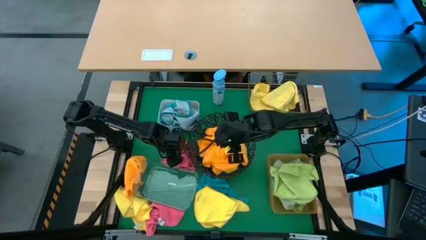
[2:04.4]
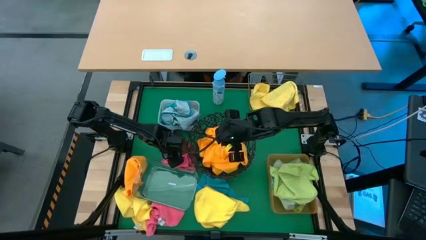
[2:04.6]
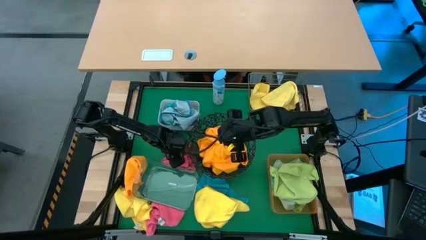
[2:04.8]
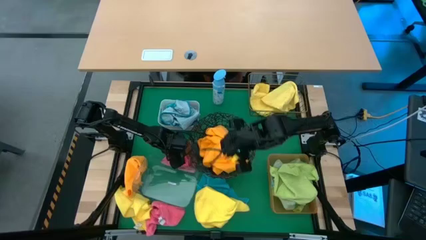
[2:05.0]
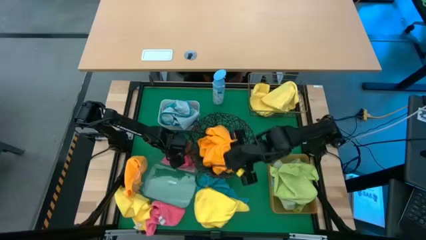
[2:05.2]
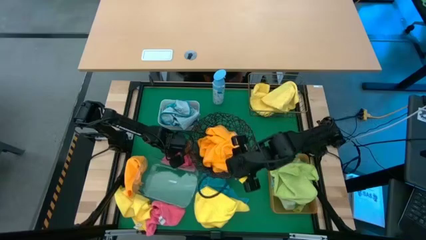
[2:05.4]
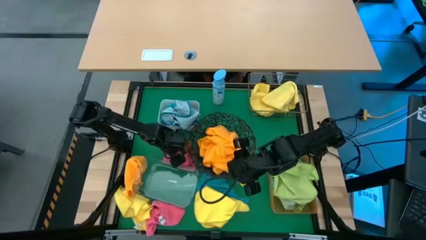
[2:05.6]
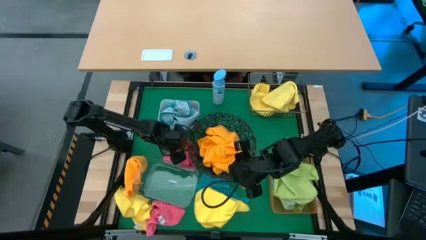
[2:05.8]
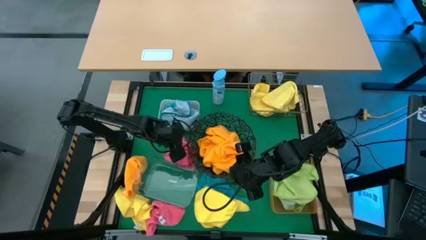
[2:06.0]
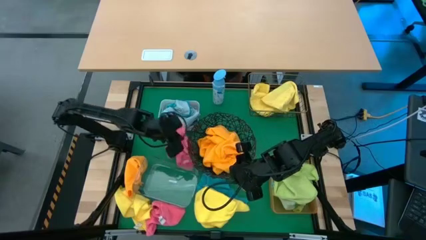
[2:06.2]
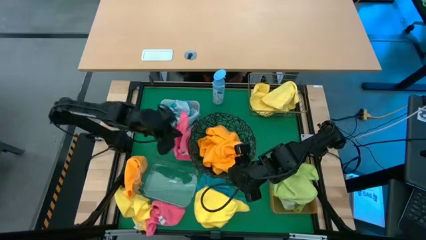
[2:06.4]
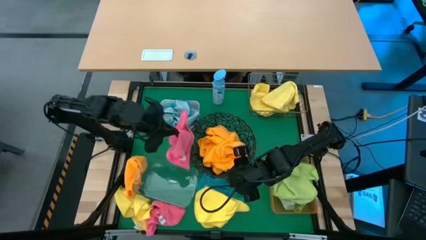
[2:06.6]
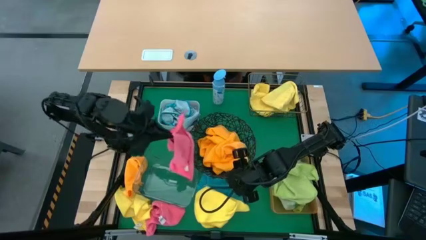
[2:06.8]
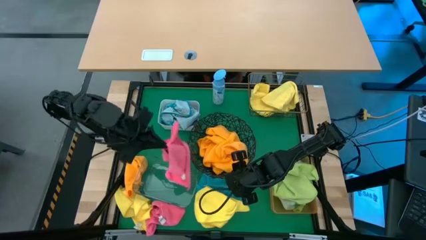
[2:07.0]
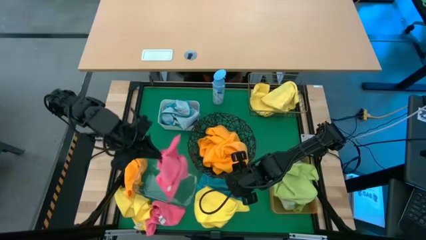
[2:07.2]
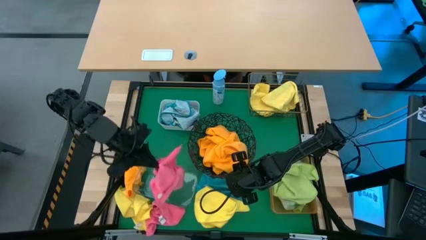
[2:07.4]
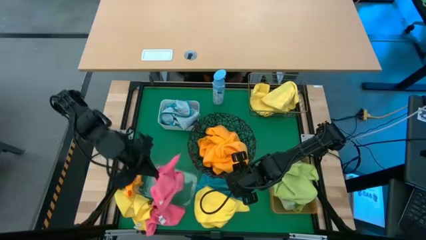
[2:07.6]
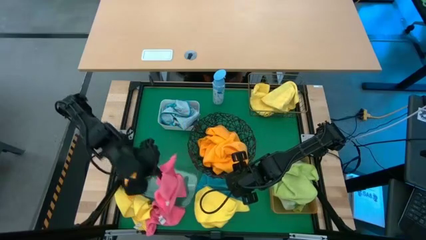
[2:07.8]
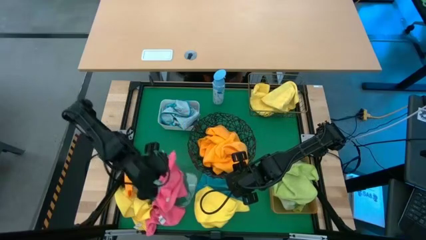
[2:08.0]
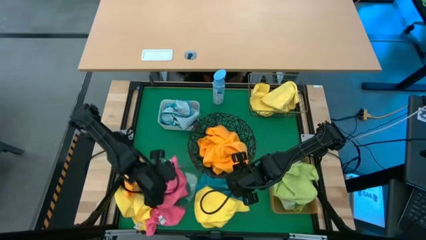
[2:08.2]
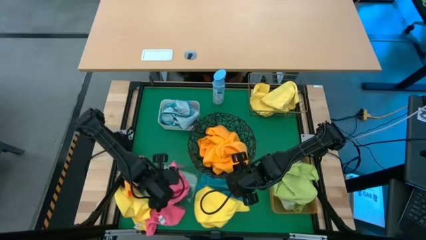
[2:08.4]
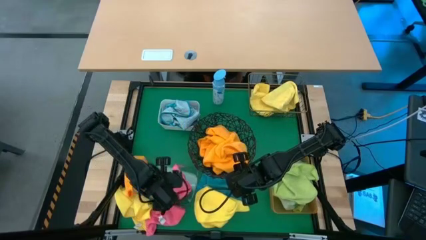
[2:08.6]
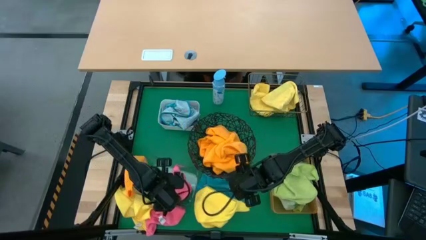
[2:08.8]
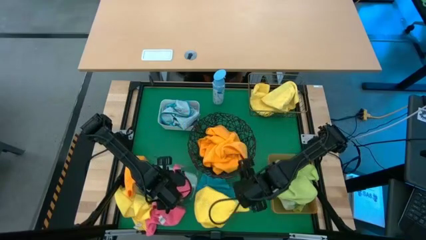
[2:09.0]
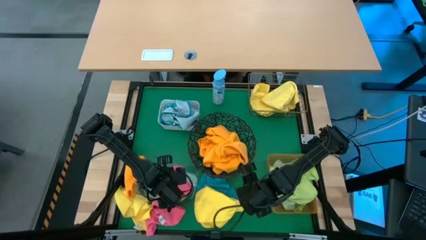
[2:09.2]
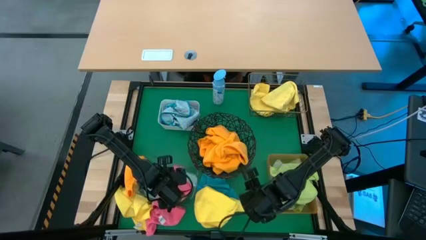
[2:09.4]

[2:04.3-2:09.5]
Task: Sort microfiber towel by color & place in baskets
Put the pink microfiber towel into the transparent bin

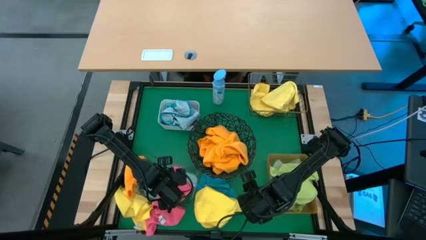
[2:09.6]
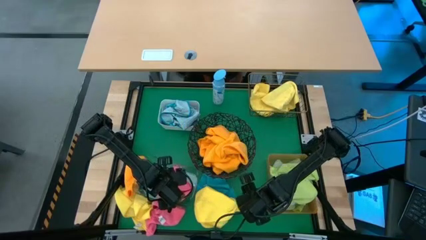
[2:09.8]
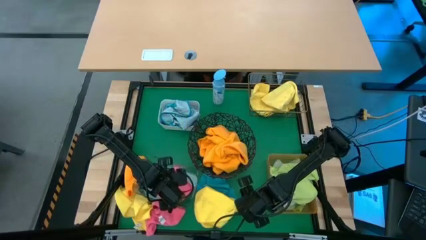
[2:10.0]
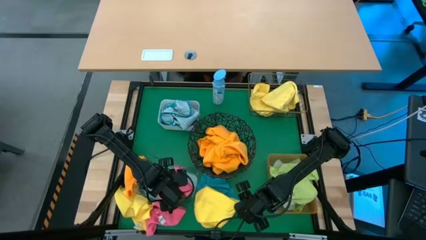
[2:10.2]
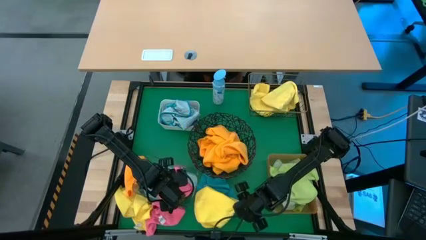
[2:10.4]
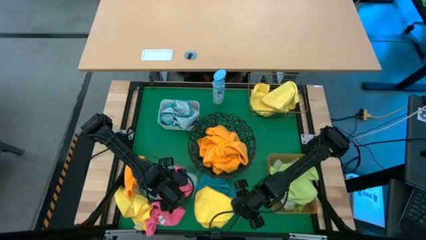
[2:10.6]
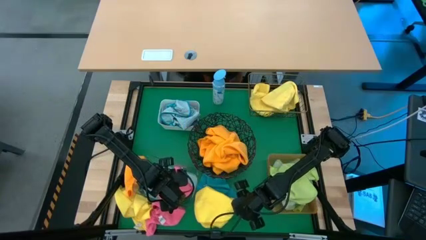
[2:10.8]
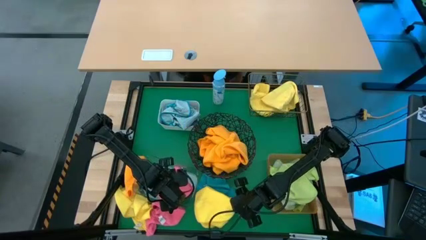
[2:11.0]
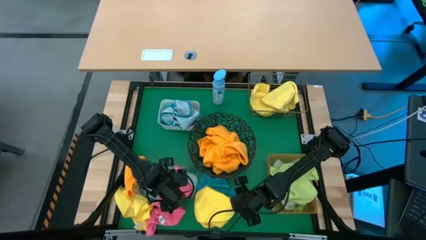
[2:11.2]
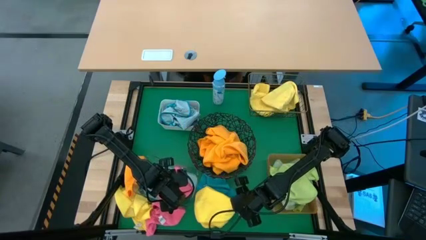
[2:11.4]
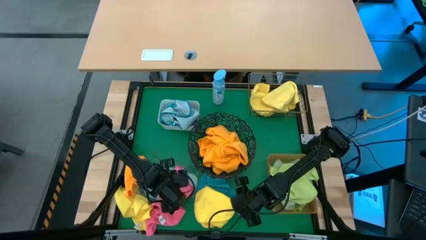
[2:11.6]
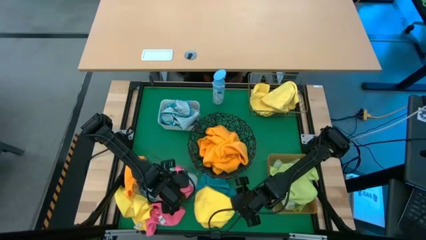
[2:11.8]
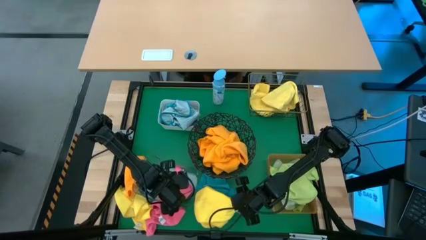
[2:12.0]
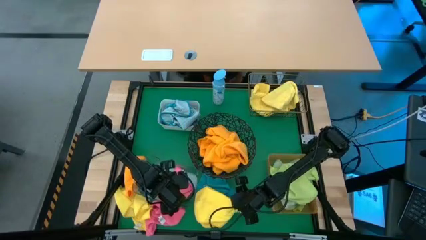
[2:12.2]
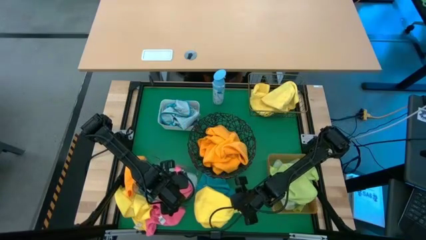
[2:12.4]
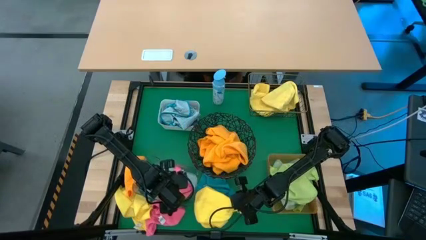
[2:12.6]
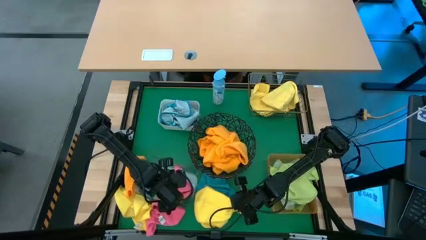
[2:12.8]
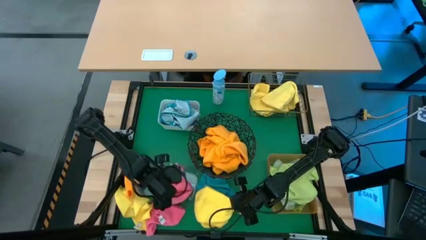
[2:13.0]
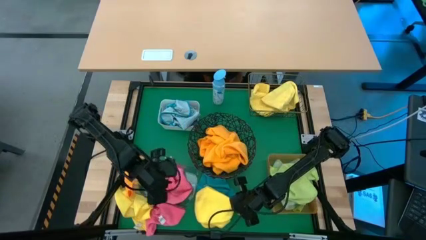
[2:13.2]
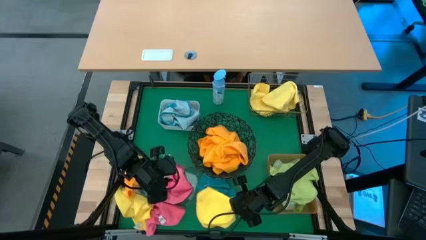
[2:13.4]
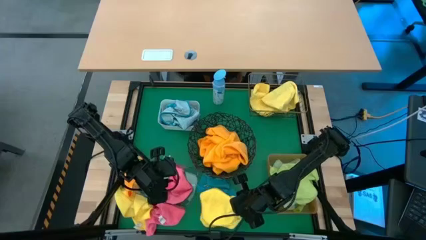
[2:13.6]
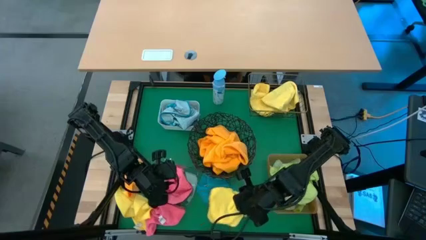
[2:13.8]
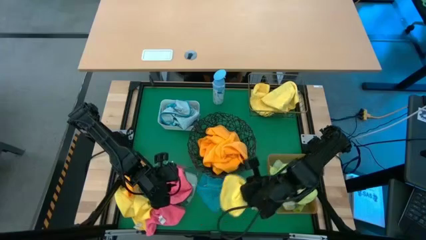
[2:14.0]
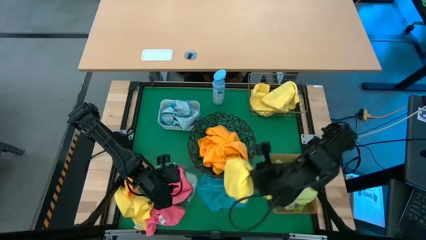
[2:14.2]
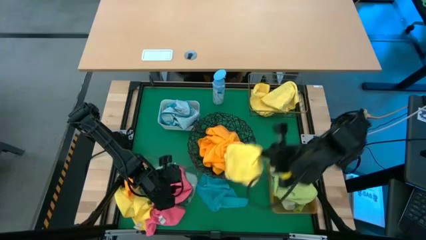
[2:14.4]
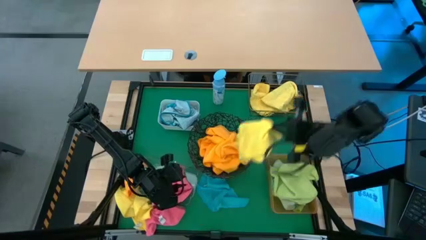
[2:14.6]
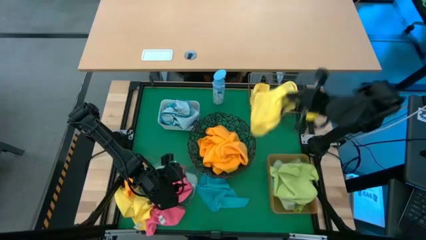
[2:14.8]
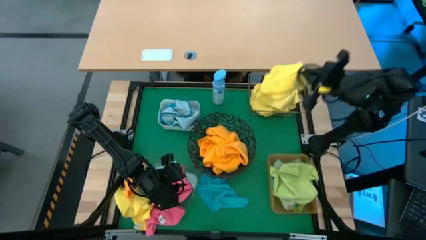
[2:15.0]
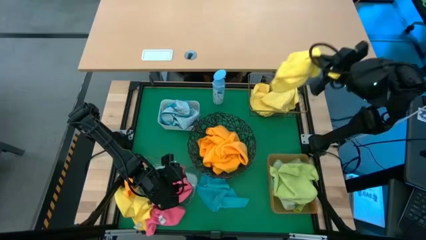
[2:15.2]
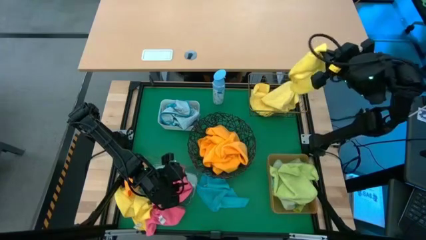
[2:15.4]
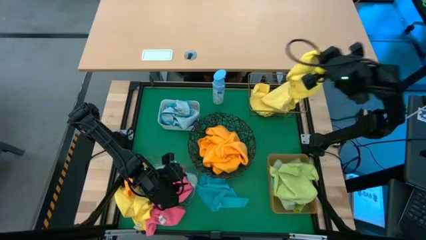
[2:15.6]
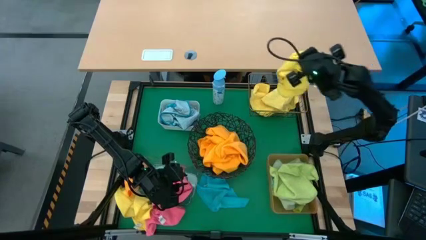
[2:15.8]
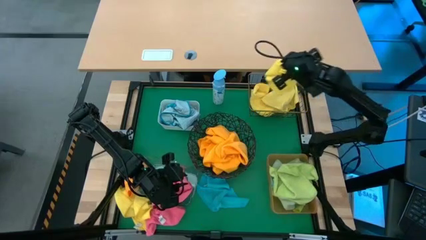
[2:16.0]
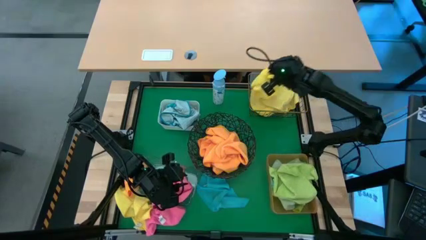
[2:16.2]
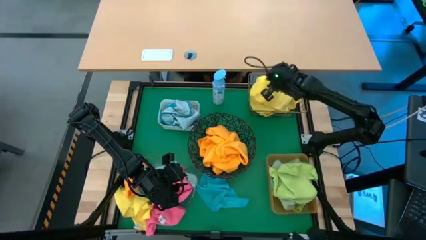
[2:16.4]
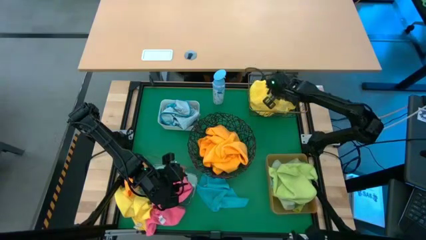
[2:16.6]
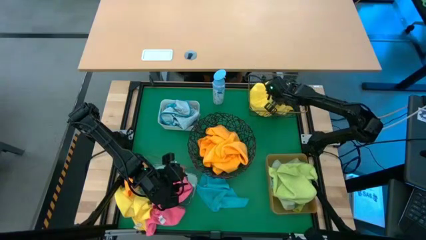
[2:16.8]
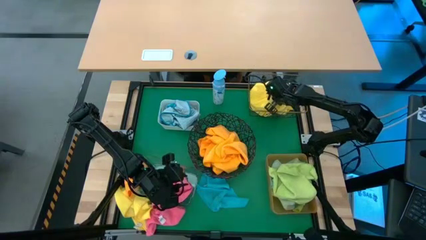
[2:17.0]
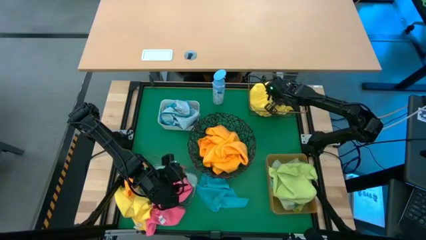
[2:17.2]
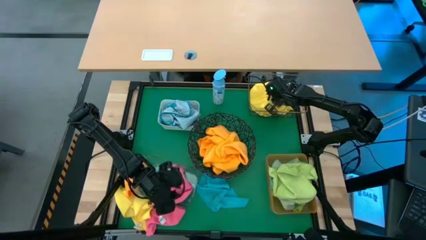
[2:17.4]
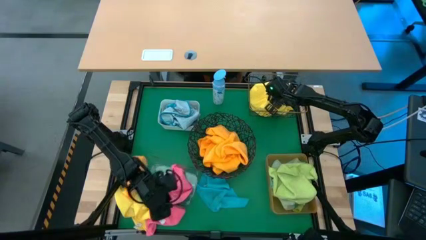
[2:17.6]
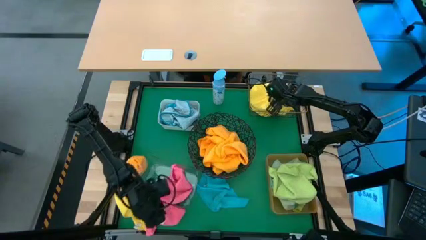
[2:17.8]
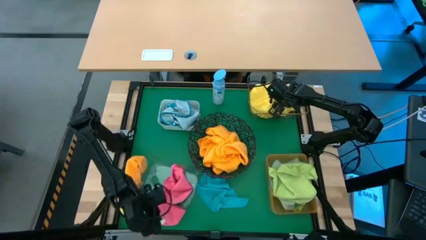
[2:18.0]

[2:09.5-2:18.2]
Put the yellow microfiber towel into the square wire basket

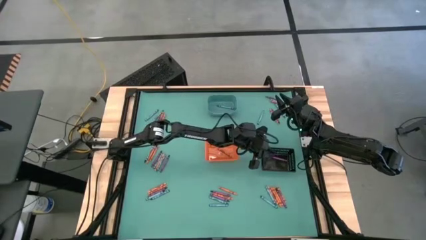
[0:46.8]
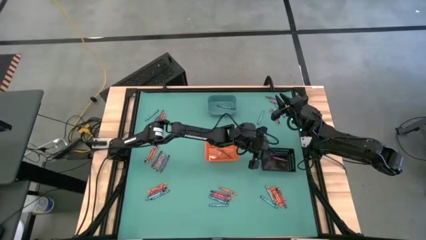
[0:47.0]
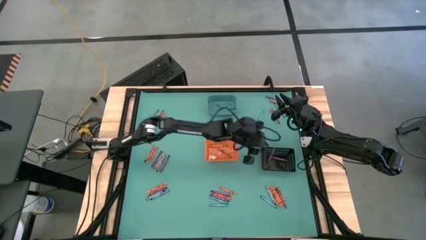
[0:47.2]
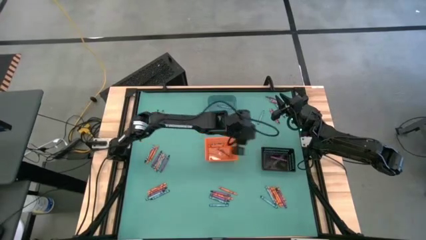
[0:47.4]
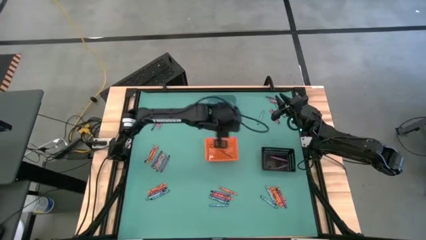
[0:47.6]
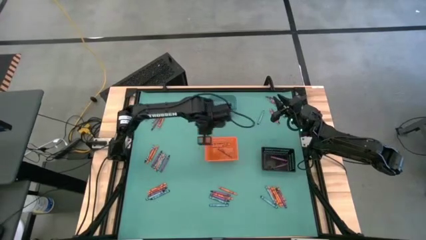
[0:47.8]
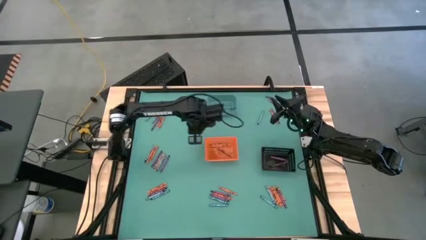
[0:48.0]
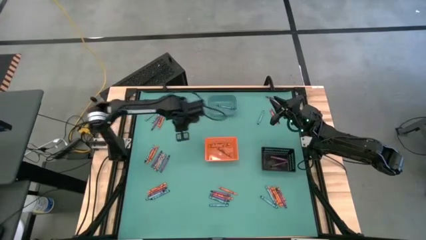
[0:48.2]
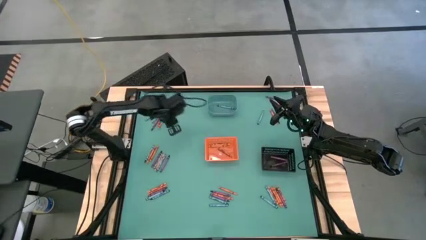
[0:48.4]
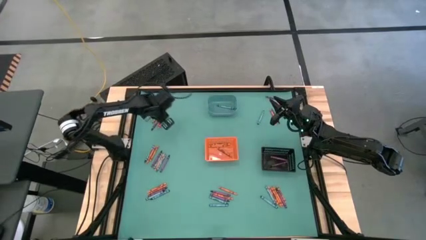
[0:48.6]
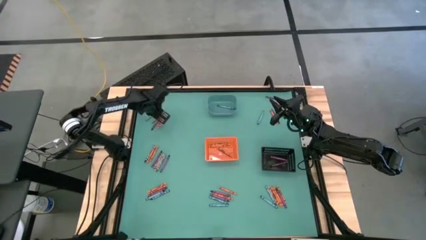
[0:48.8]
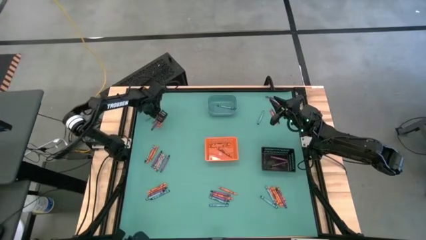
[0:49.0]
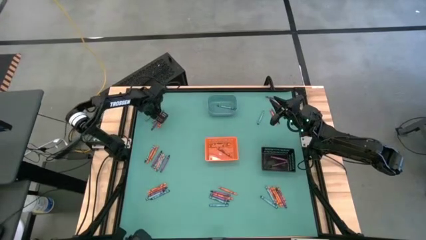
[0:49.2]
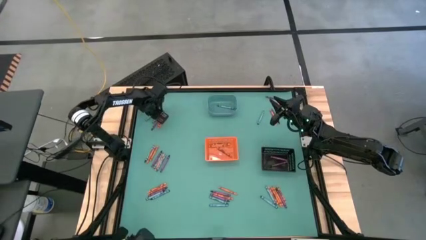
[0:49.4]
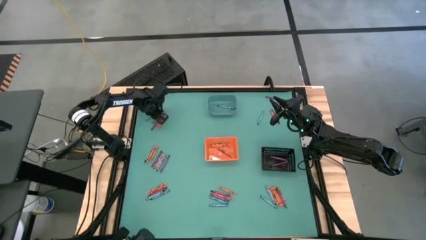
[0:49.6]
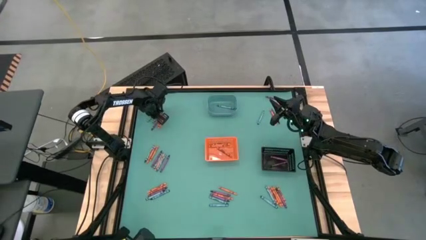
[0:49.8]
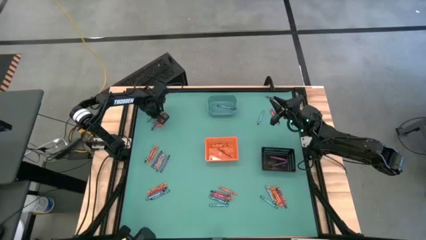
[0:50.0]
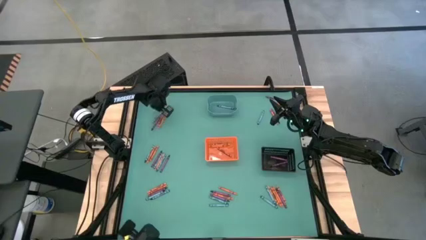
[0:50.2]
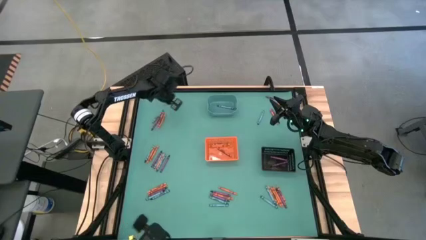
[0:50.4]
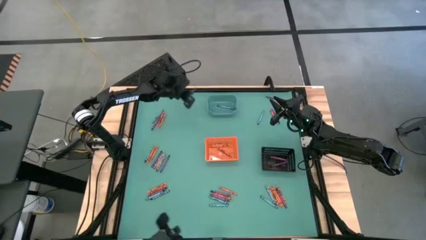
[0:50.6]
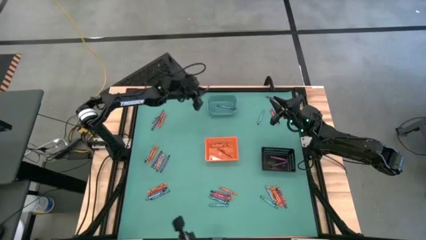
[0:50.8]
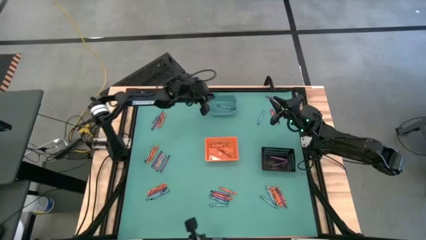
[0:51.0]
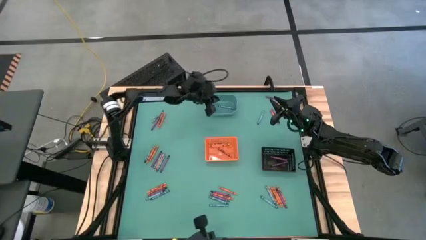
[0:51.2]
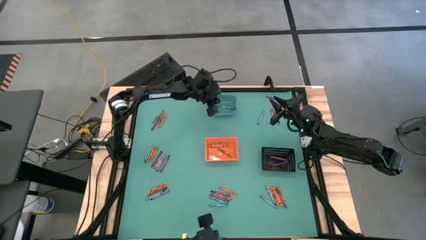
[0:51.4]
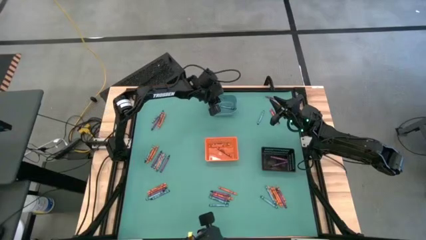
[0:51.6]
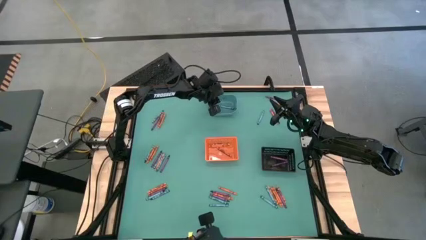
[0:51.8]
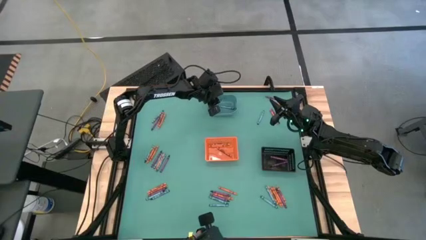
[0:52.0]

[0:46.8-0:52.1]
Task: Sort crayons
Put the green crayon into the blue bin
